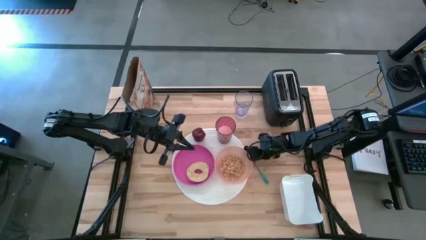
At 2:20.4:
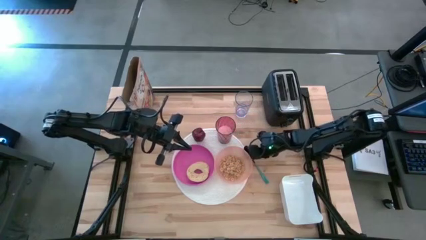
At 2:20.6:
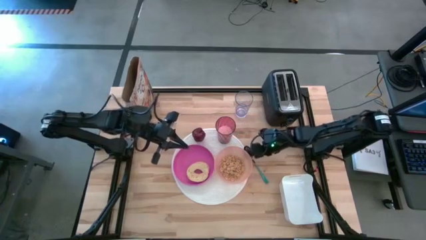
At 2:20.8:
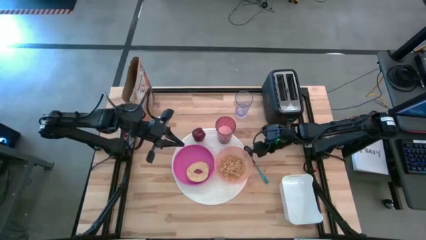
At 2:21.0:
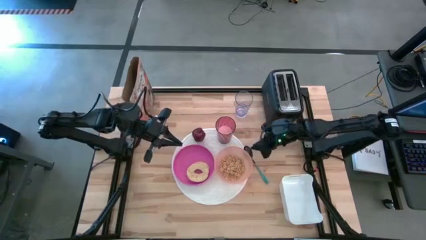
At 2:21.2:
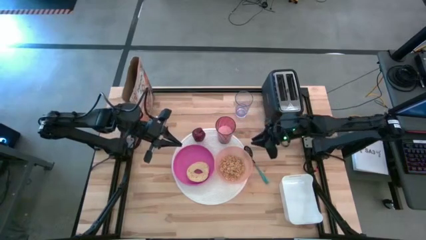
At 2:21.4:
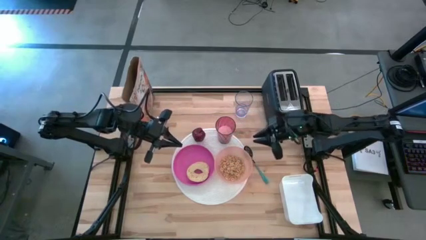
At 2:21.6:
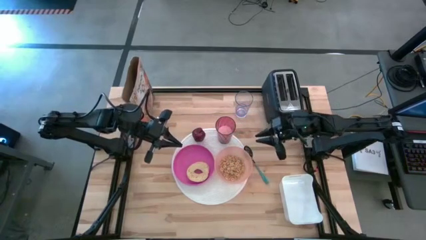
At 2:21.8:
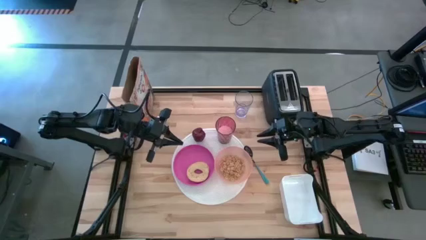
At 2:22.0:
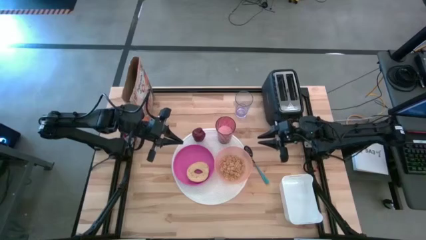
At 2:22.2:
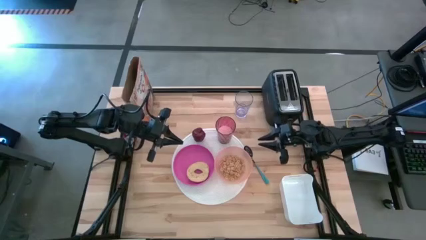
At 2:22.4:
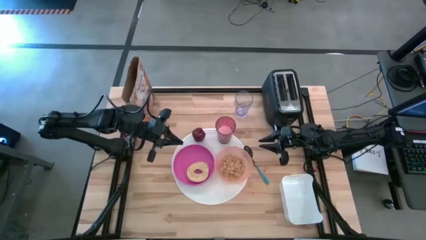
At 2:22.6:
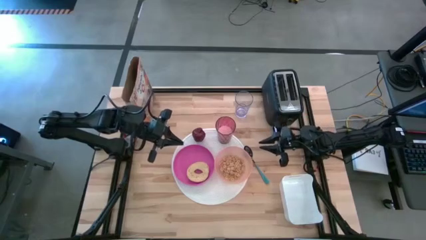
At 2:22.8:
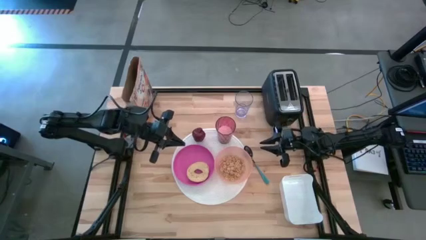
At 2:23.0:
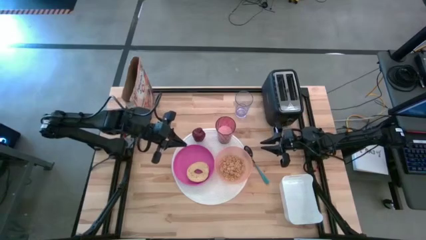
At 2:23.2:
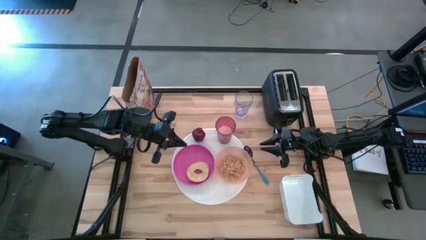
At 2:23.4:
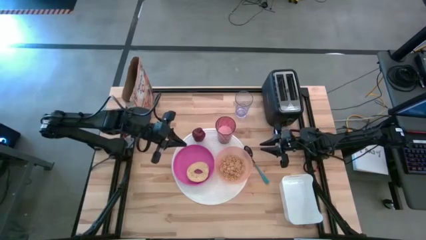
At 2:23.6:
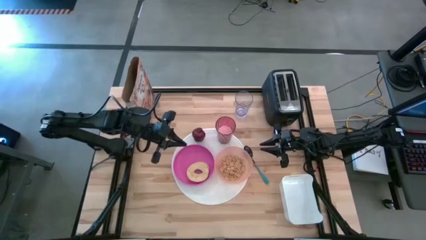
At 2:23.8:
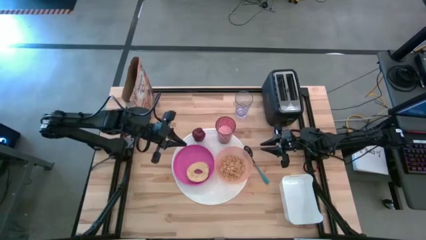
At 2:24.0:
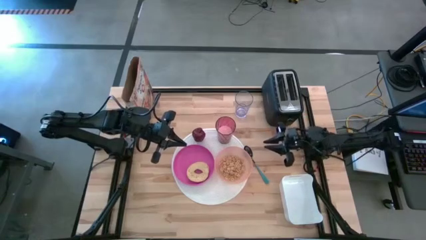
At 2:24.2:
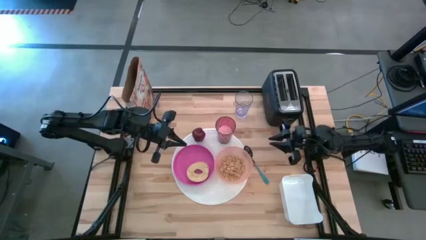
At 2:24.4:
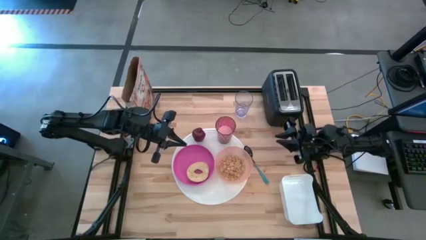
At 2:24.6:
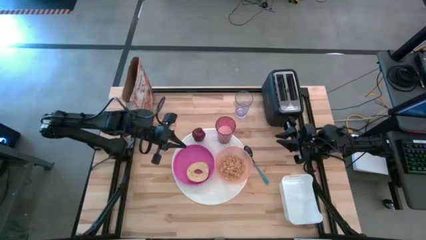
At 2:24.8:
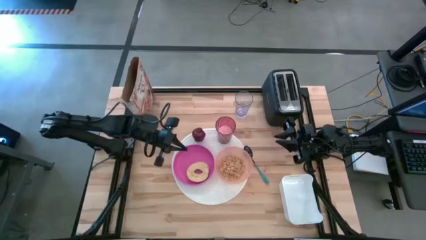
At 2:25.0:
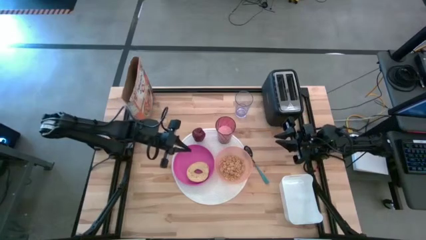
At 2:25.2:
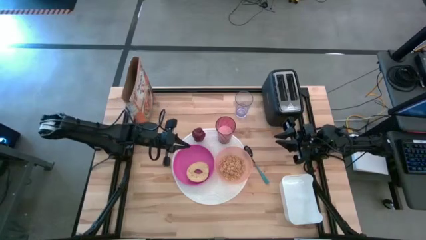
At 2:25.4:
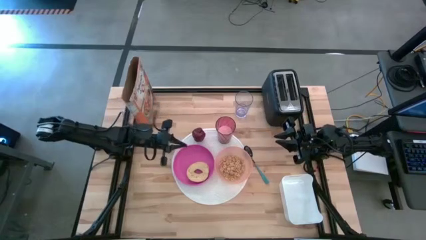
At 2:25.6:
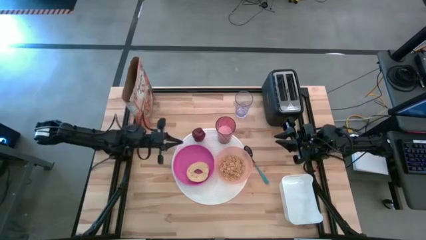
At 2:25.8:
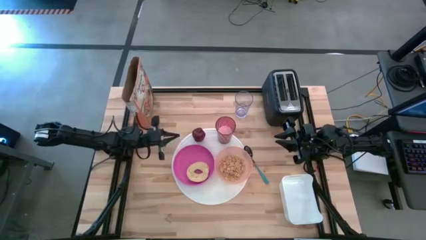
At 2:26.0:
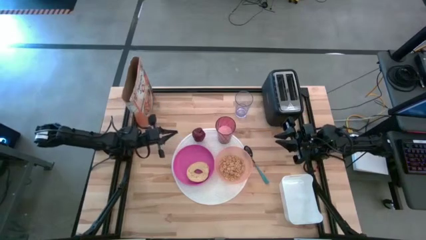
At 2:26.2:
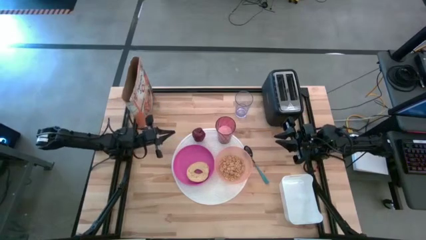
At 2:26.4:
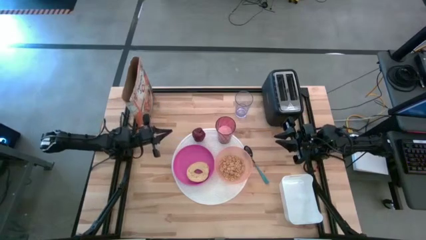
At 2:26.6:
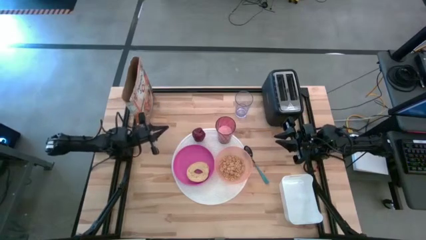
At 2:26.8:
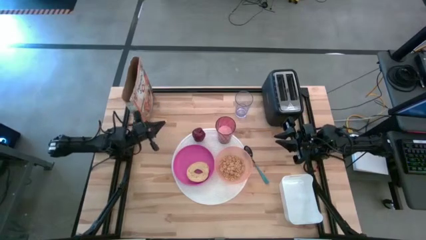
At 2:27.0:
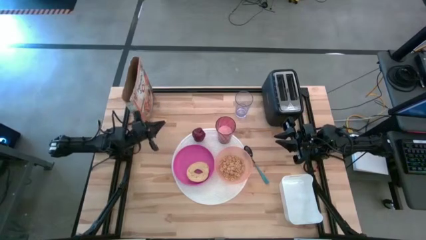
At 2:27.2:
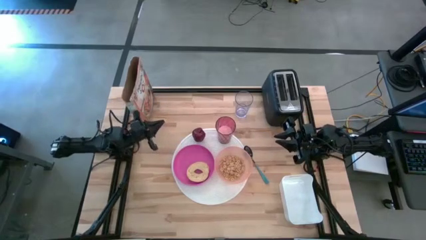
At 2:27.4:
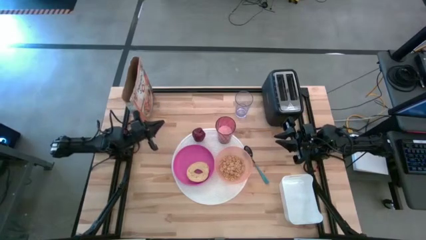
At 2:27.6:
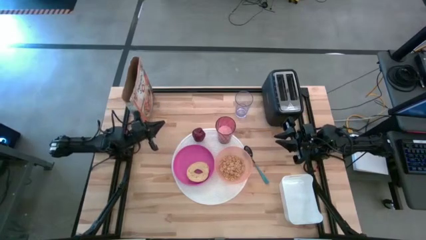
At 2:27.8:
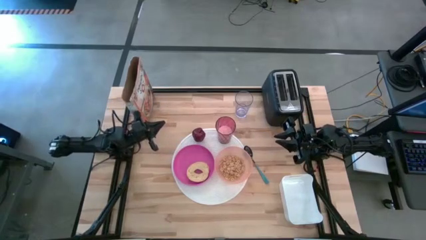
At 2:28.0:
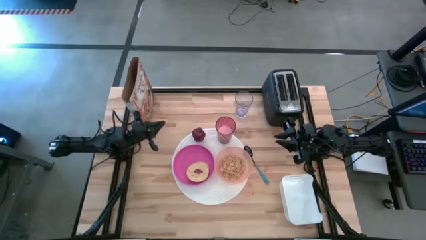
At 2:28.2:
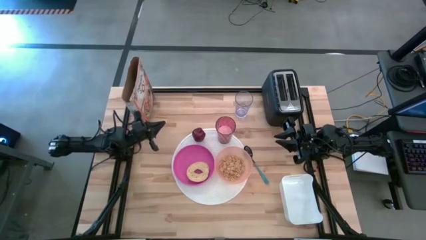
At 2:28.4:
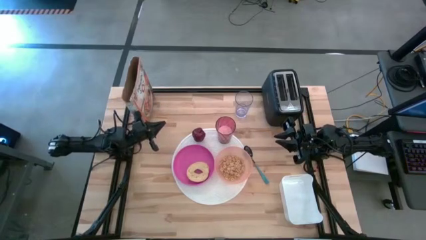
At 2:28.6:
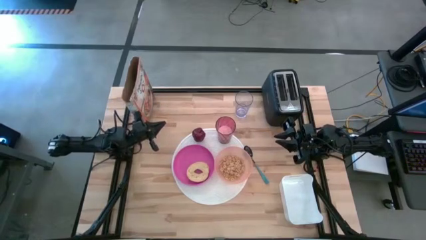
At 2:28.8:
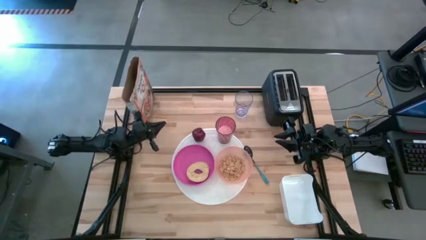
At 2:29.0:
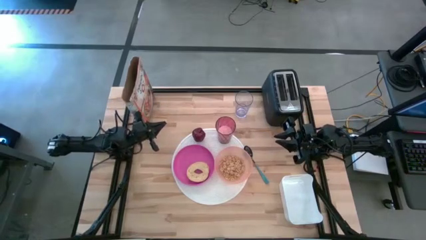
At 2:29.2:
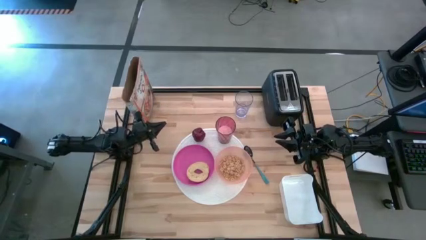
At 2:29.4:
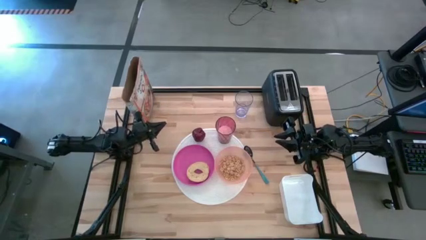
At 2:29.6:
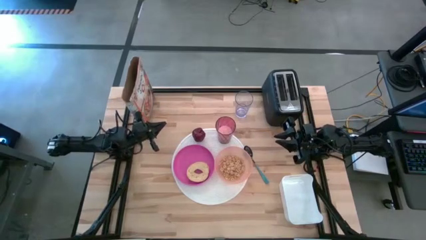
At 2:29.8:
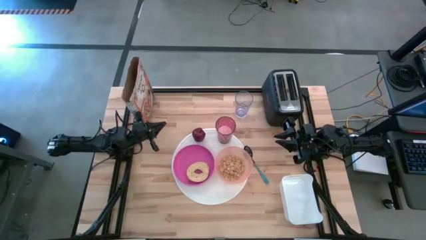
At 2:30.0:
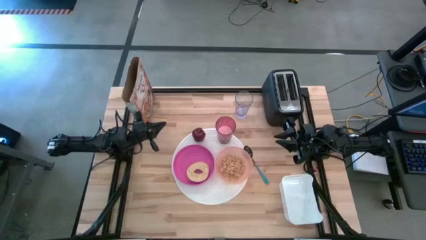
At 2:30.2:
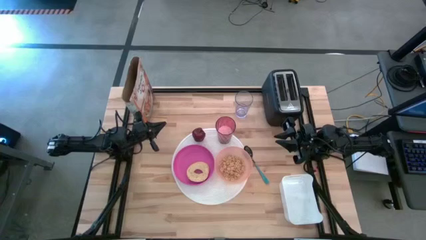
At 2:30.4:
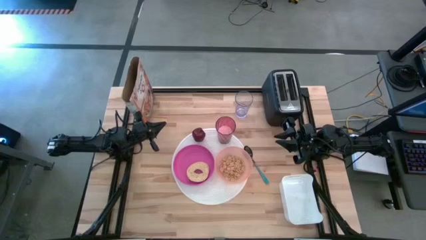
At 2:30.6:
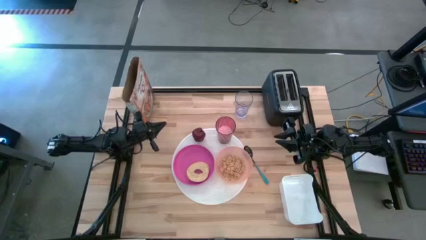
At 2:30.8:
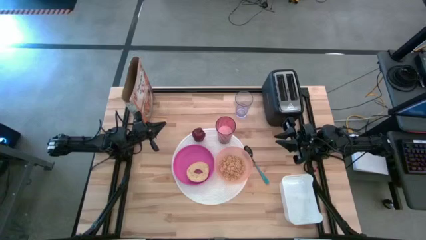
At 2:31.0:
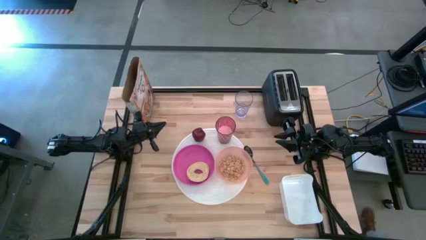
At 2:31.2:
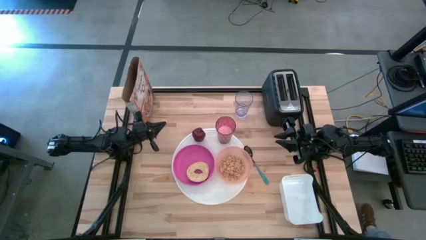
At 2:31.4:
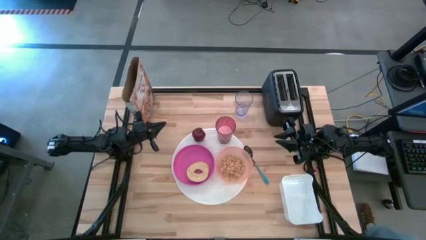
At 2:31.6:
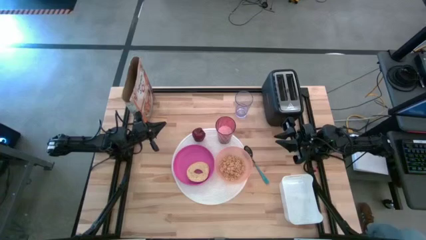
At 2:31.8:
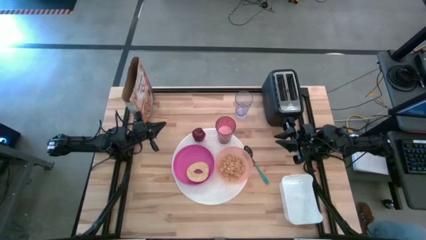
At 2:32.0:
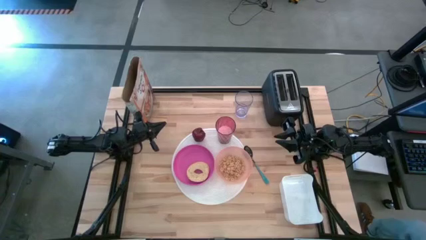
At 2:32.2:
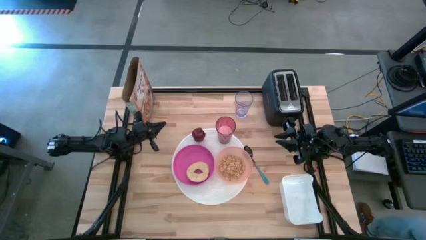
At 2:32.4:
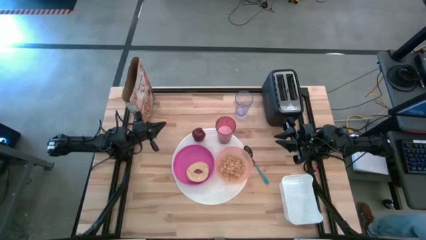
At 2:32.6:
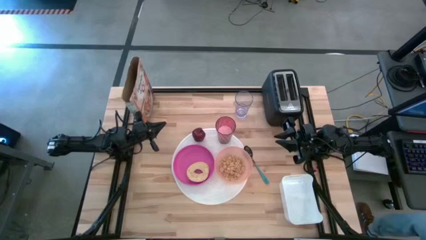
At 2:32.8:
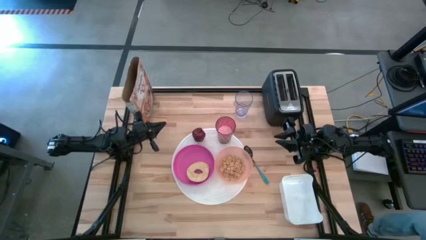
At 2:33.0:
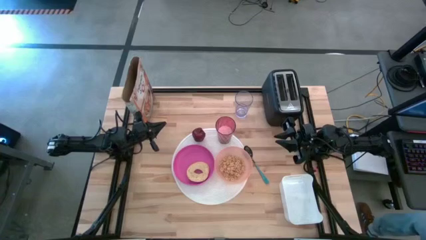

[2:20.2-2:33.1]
Task: Arrange a breakfast setting
Return to Home Position

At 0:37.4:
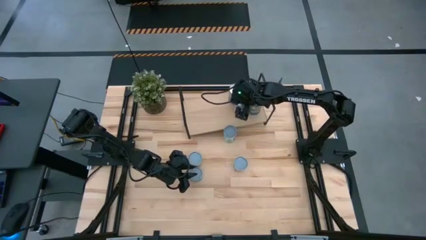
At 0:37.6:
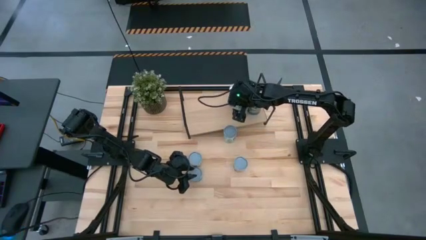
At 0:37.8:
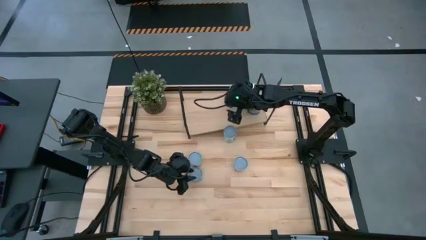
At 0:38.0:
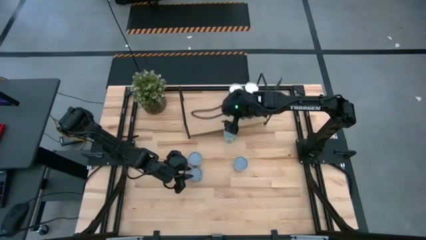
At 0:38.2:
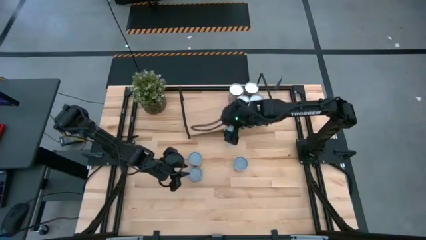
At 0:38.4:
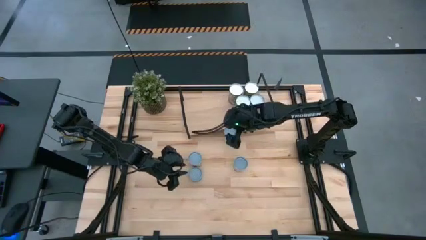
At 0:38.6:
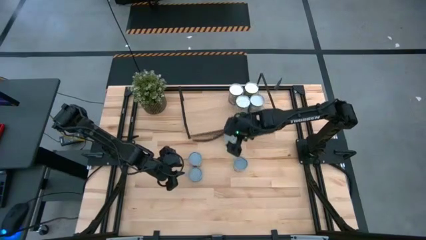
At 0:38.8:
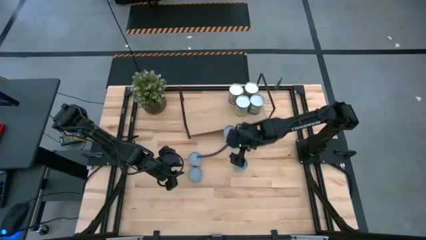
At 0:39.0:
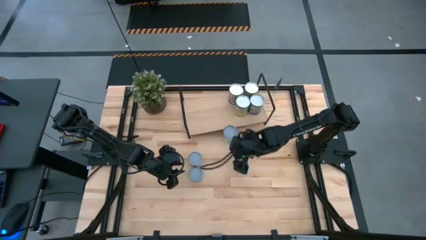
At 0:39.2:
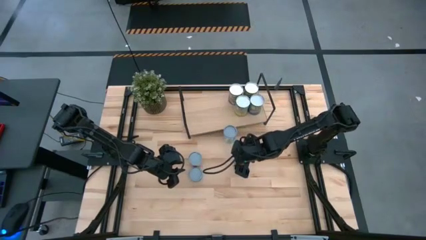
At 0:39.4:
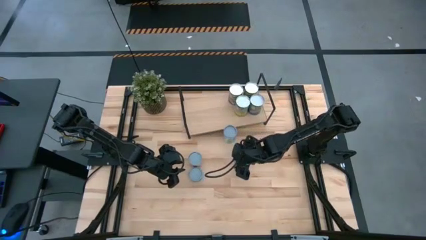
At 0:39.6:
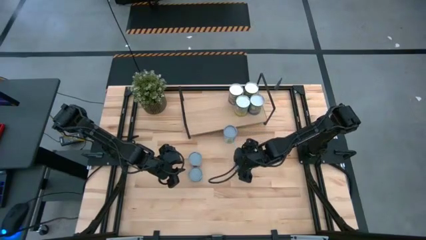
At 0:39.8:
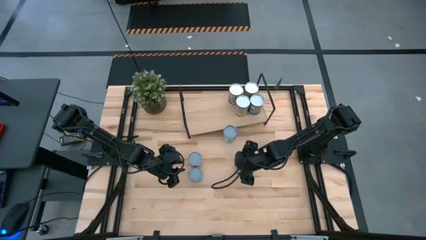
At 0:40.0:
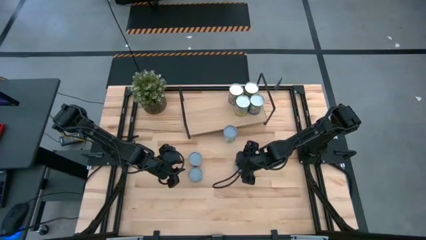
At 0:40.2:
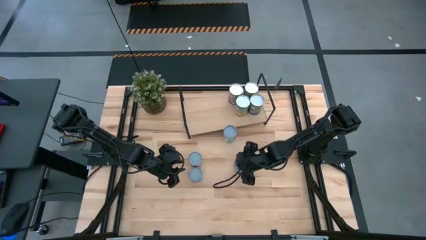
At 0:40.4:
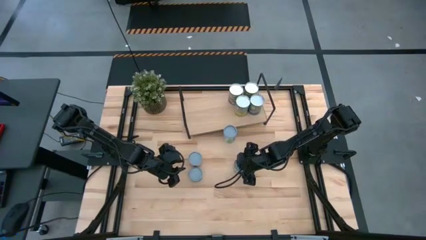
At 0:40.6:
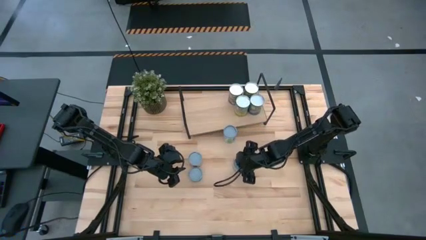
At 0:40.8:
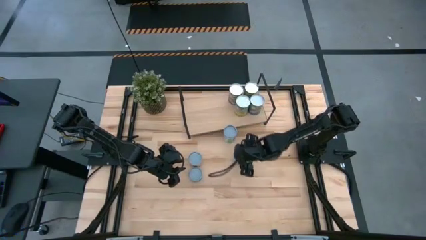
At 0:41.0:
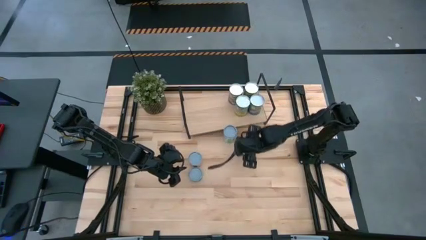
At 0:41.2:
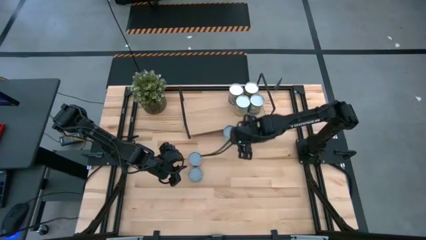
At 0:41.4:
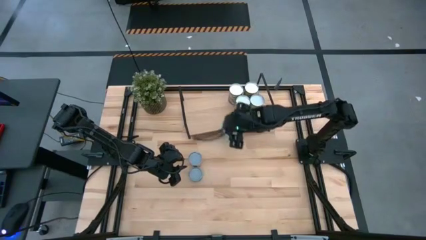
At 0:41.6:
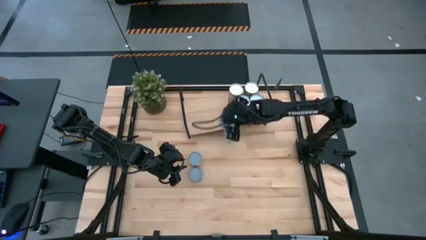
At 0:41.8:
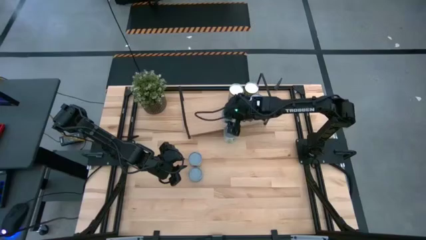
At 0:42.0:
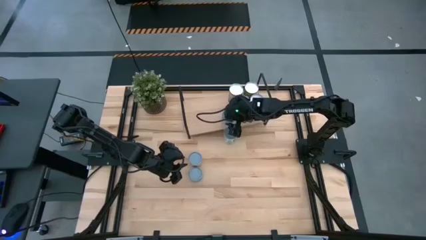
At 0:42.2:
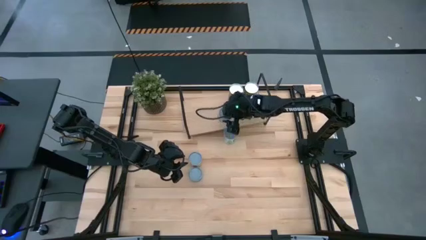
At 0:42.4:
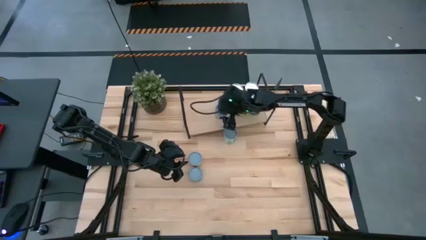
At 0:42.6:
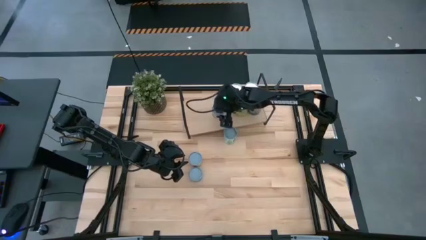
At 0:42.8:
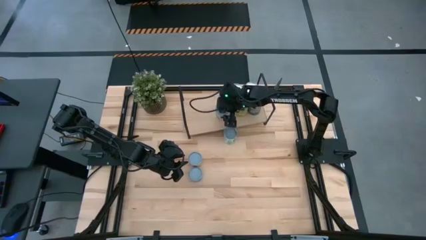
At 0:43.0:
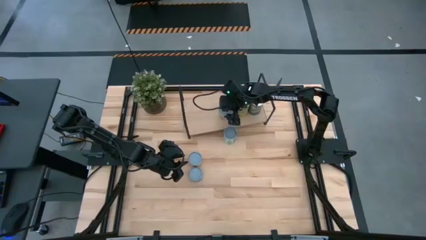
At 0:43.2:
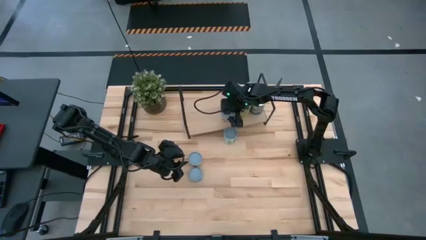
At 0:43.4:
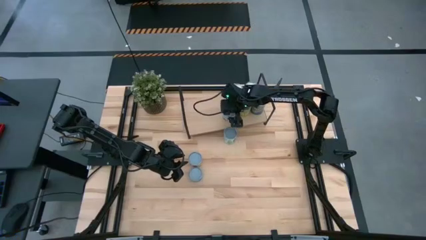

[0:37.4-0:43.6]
Task: Pick and place cans onto a shelf
Put the canned green peas can on the shelf
